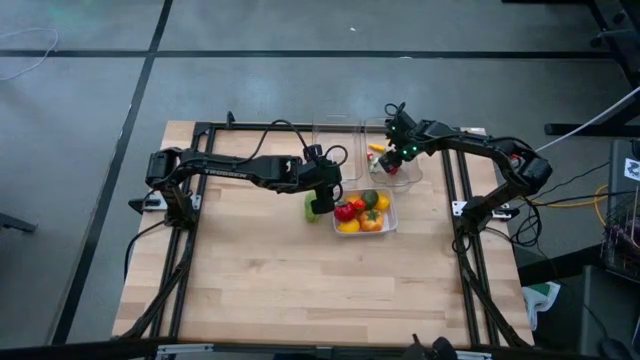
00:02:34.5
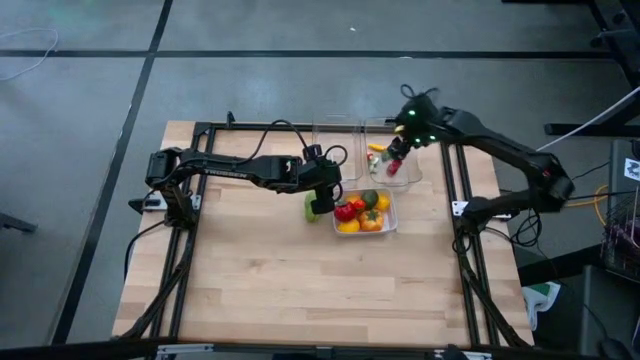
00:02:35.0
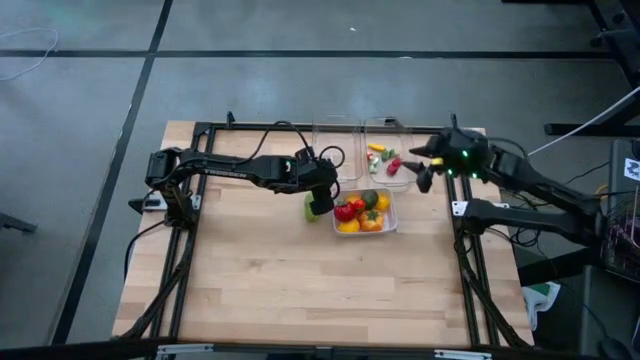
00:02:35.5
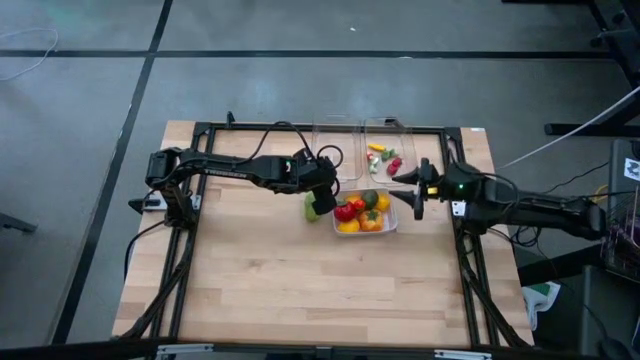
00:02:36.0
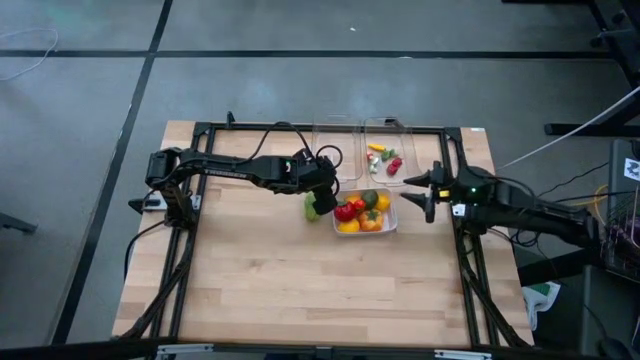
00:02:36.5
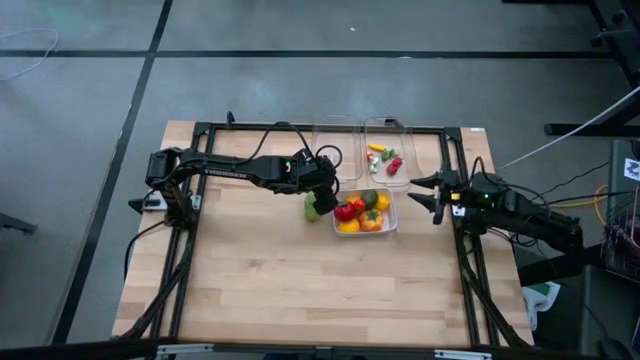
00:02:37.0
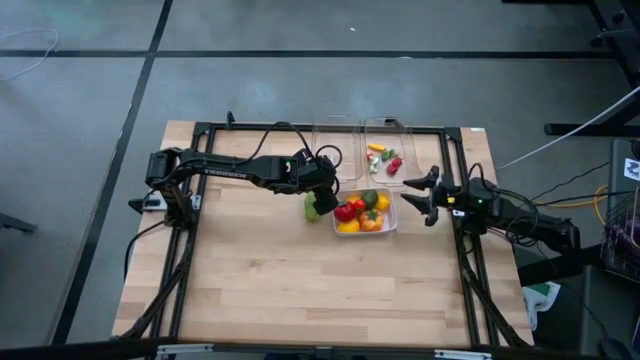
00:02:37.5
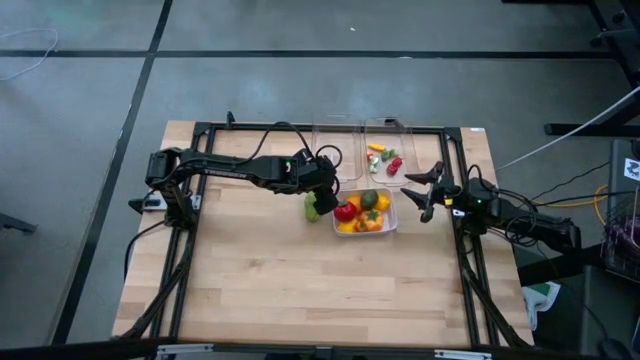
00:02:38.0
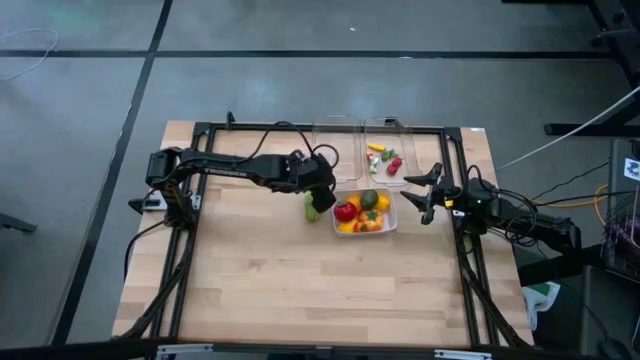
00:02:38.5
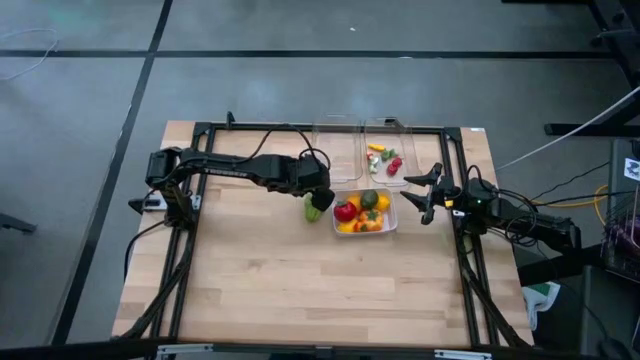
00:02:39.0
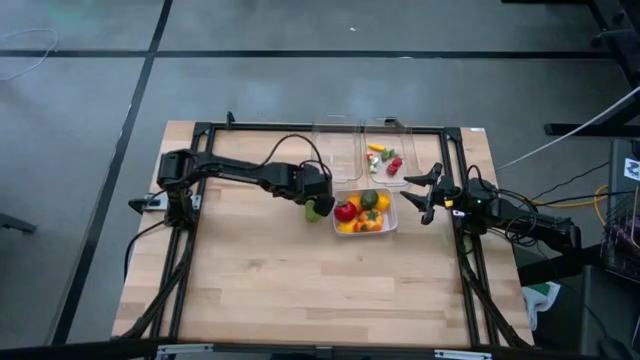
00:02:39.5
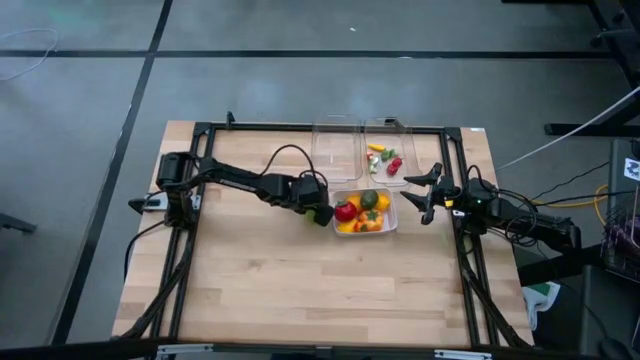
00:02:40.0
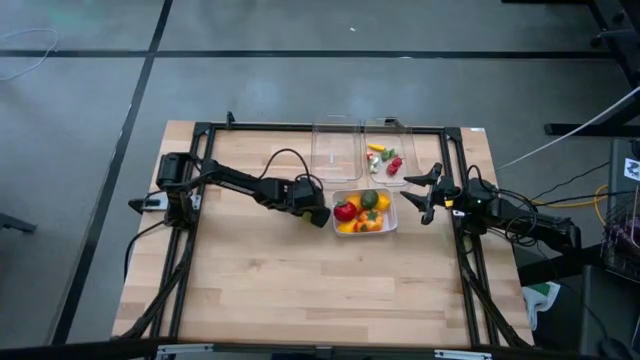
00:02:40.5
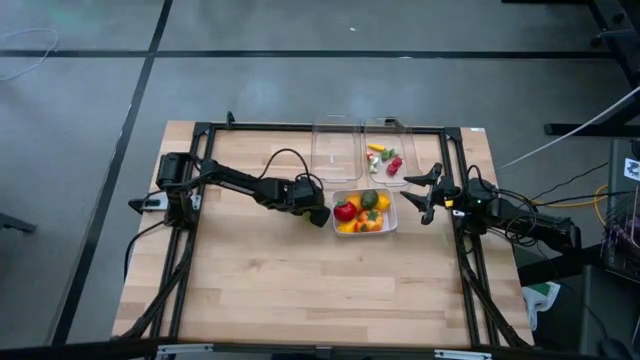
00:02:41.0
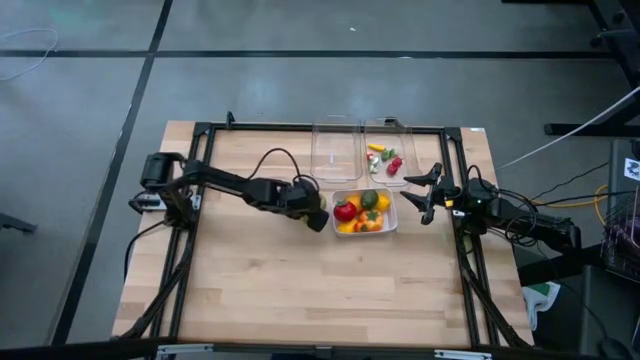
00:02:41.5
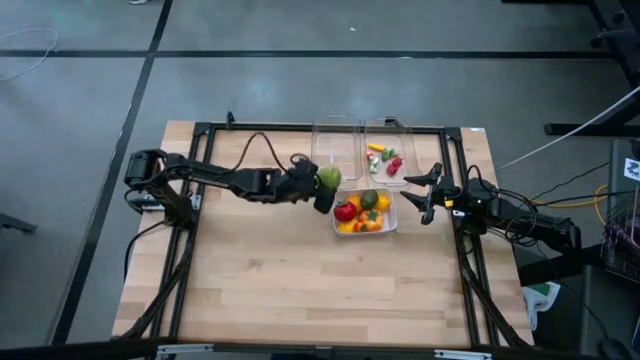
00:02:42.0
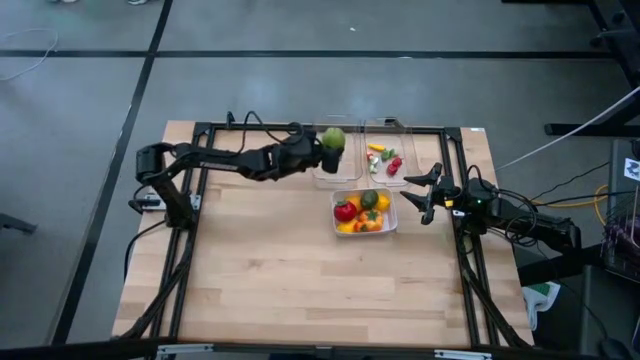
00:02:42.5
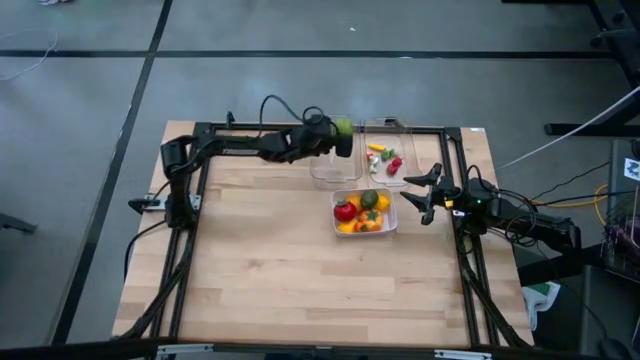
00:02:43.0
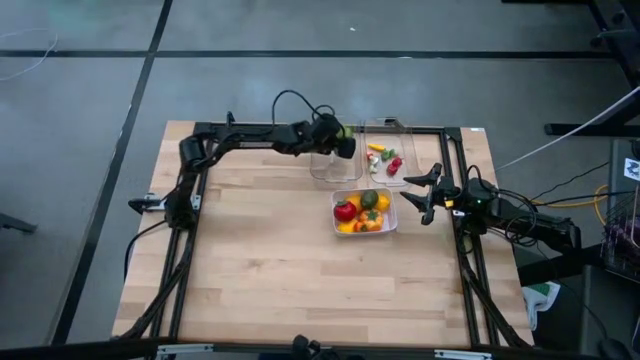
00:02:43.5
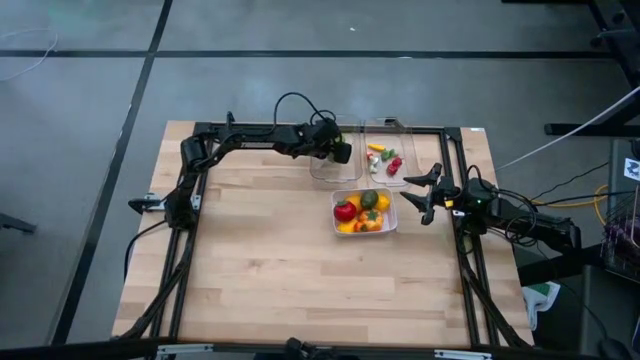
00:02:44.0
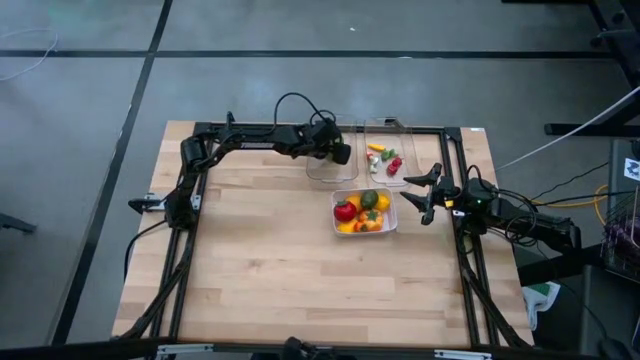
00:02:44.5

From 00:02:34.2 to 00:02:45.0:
Task: Sort produce into baskets
Put the chayote into the left transparent bin

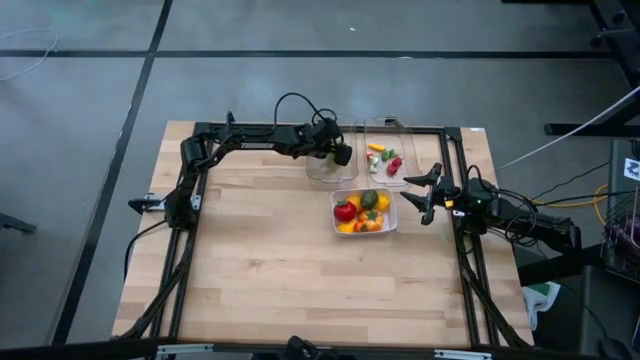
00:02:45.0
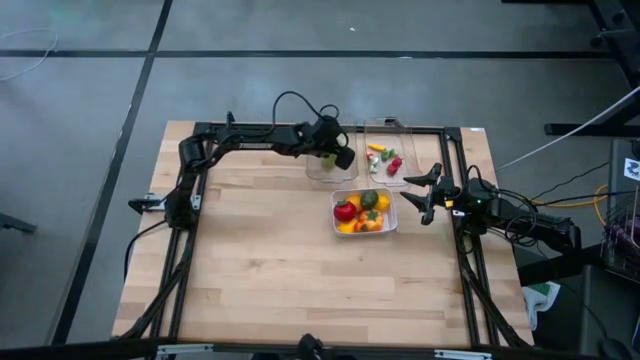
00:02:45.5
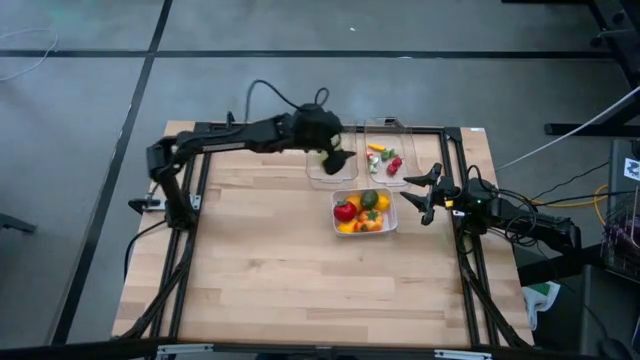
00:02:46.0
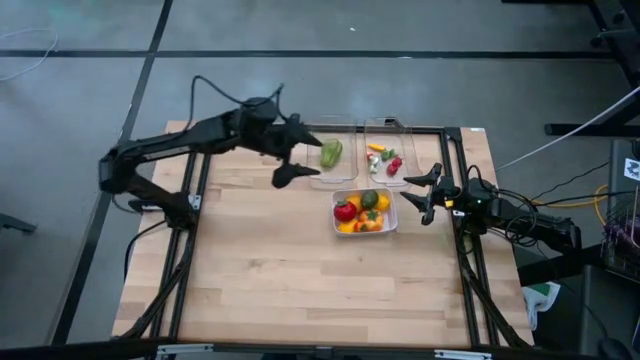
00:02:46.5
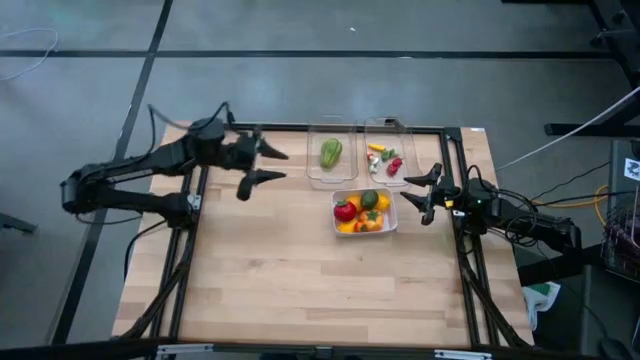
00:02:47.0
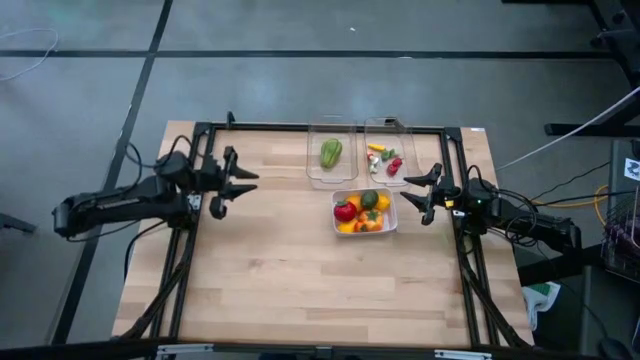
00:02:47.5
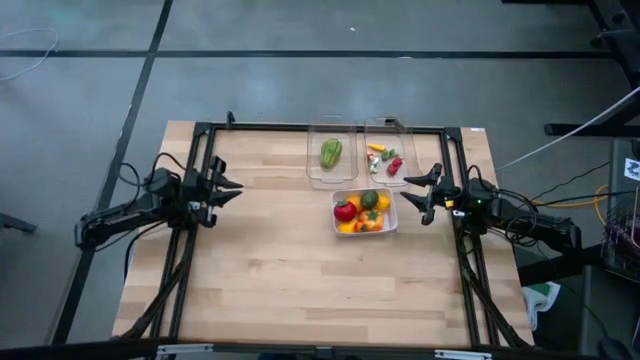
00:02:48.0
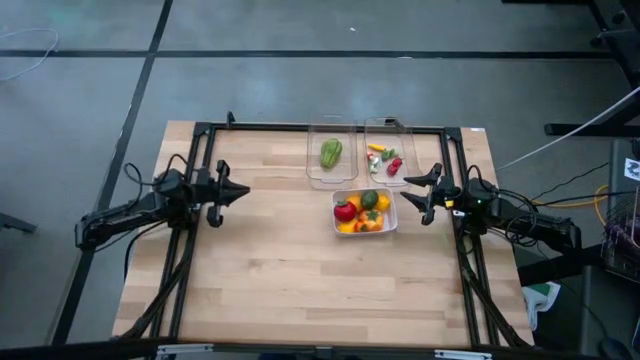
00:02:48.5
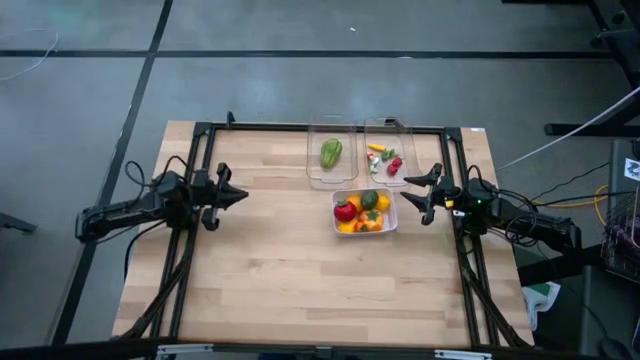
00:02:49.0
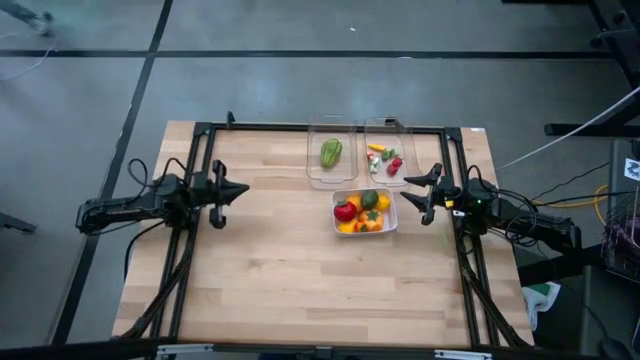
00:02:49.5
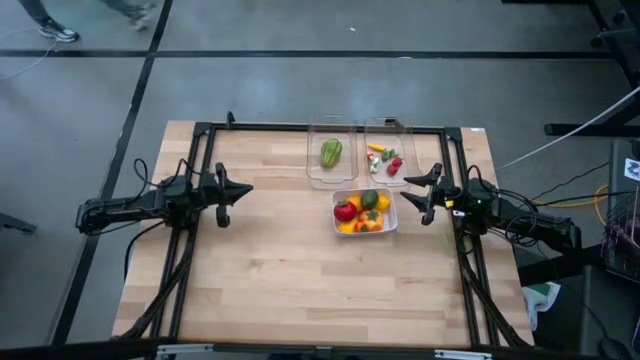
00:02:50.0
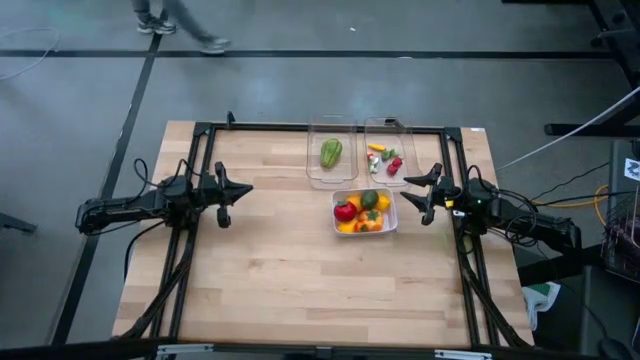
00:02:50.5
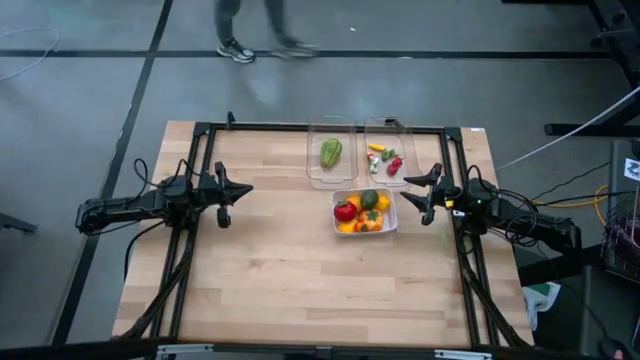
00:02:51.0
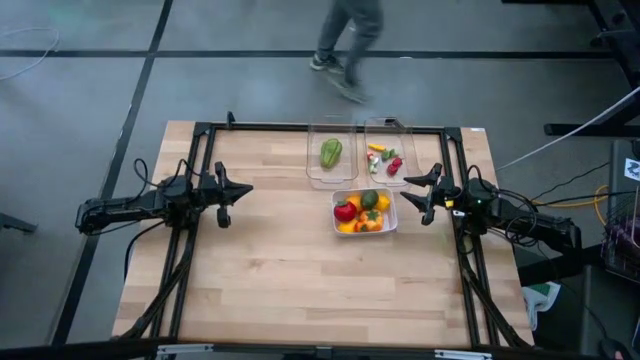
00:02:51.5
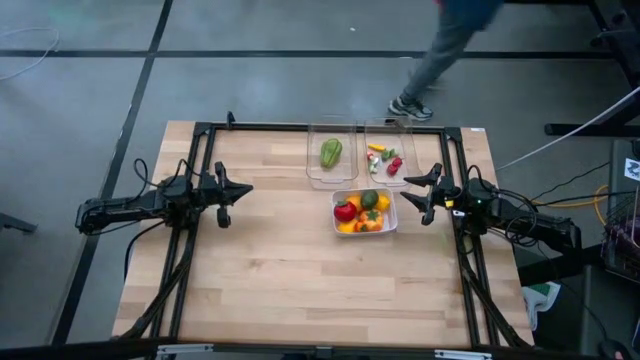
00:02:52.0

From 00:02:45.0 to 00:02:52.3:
Return to Home Position

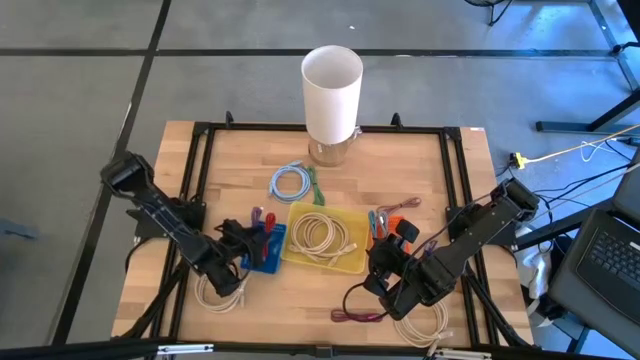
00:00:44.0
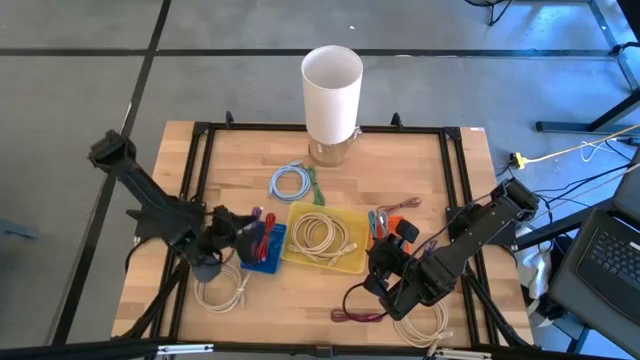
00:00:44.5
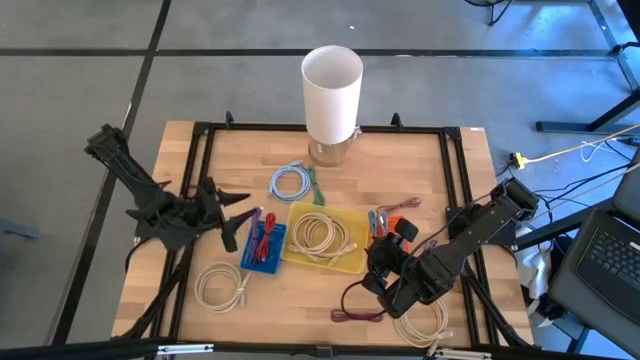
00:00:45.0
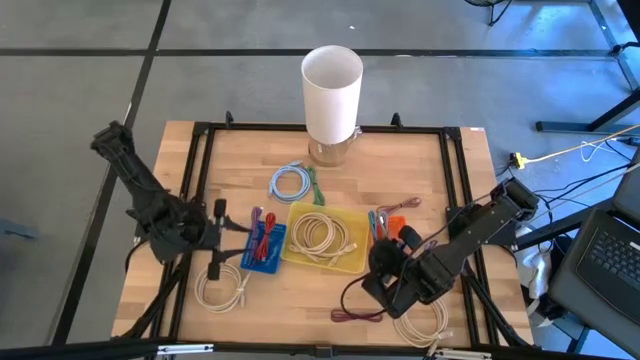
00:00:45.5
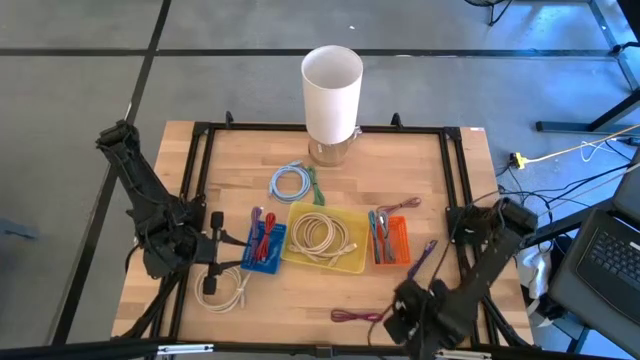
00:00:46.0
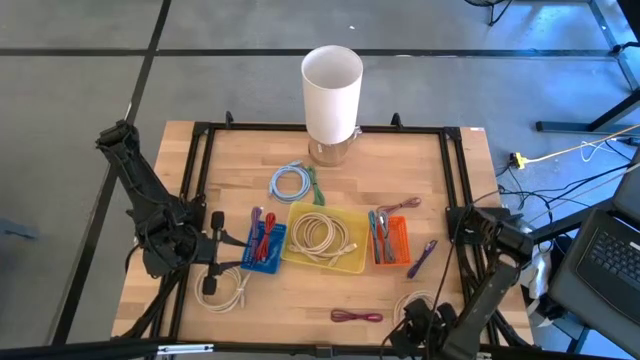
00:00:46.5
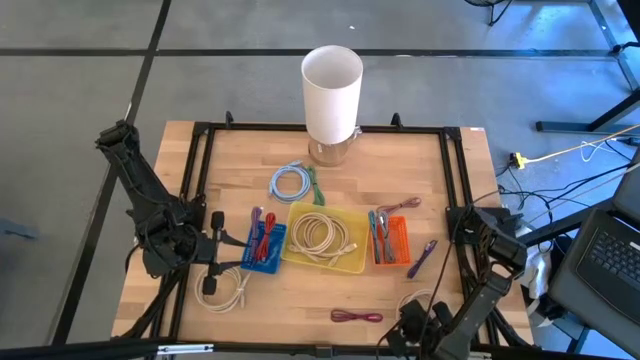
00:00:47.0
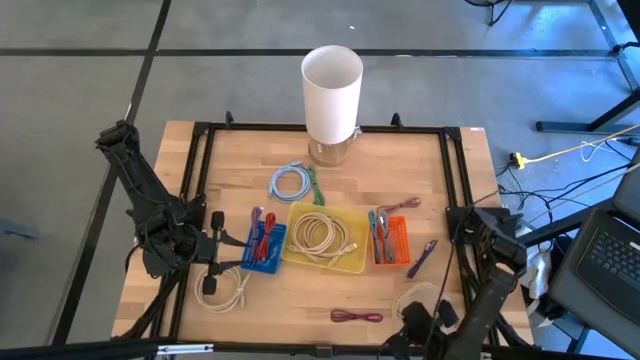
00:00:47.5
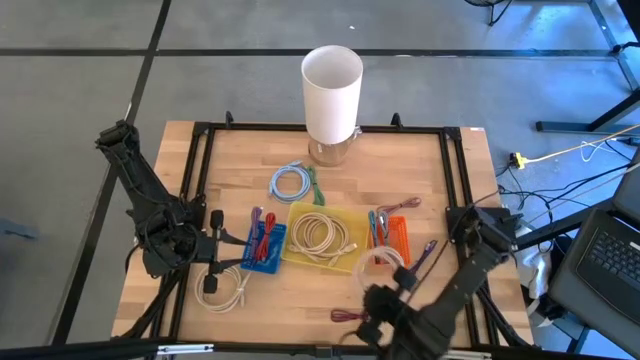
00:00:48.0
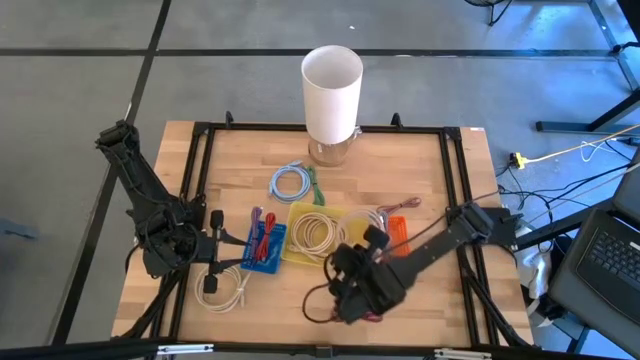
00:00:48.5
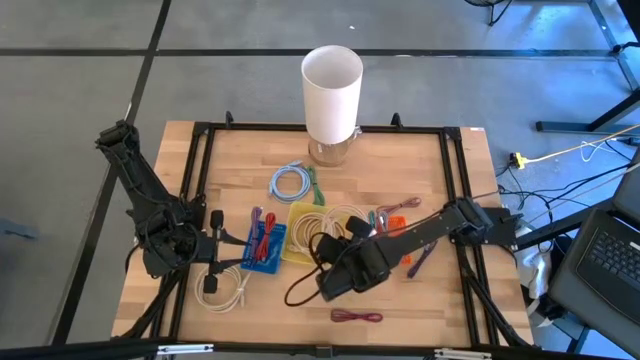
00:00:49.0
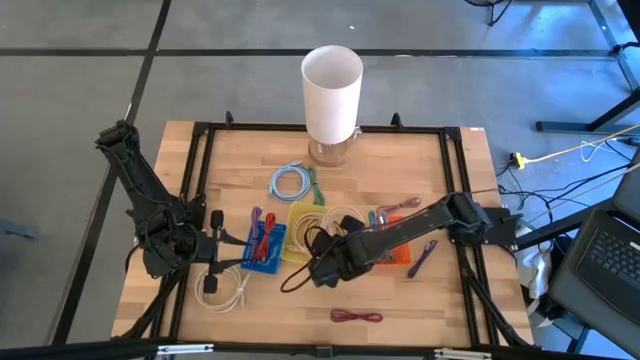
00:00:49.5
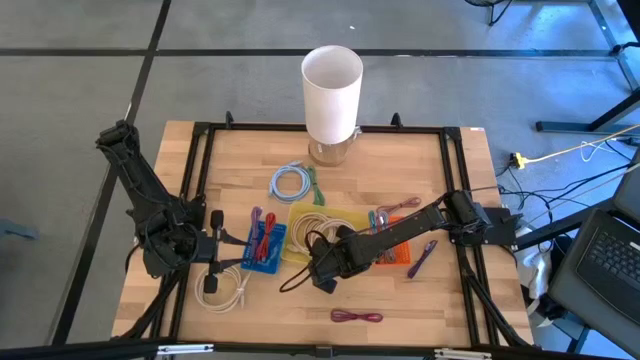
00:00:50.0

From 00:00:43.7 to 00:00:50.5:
Task: Pick & Place USB Port
Put the right white charger cable into the yellow bin
